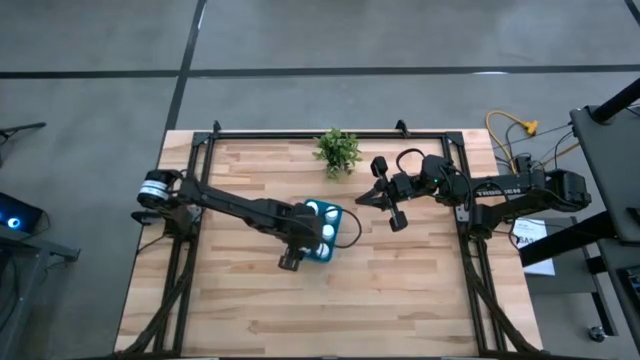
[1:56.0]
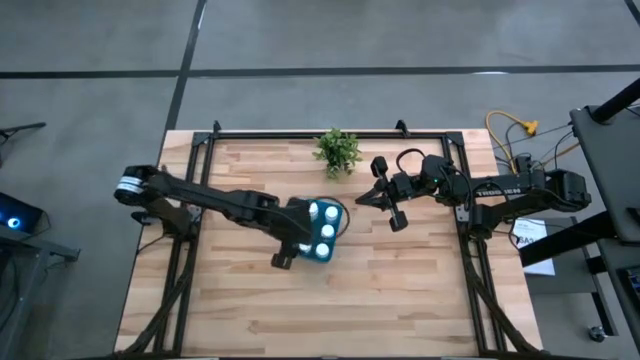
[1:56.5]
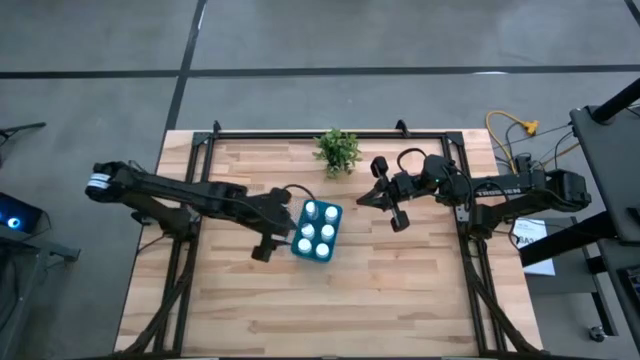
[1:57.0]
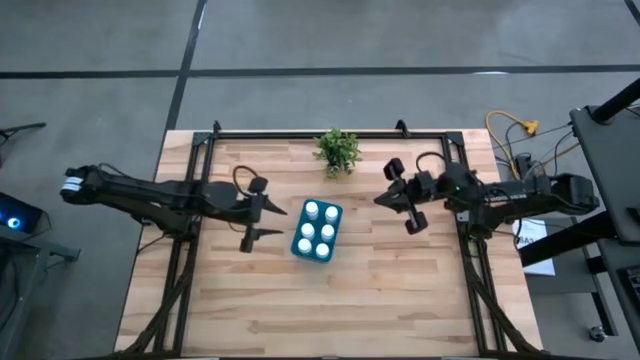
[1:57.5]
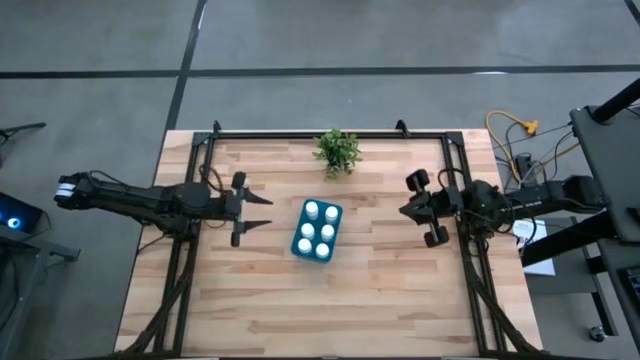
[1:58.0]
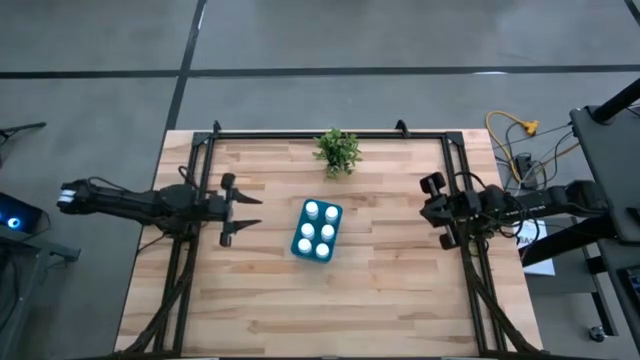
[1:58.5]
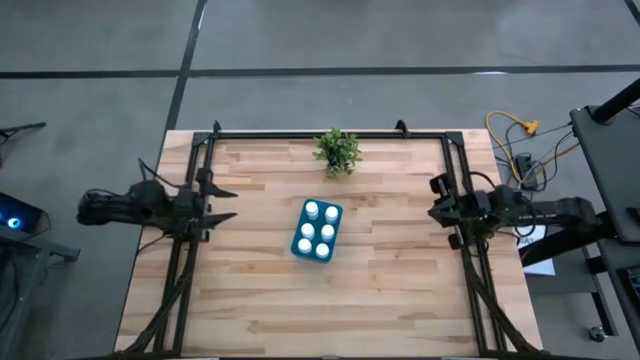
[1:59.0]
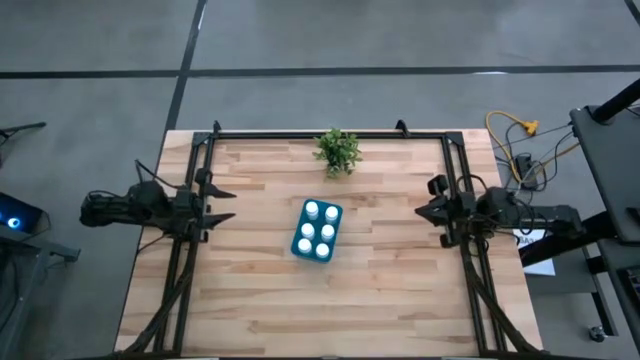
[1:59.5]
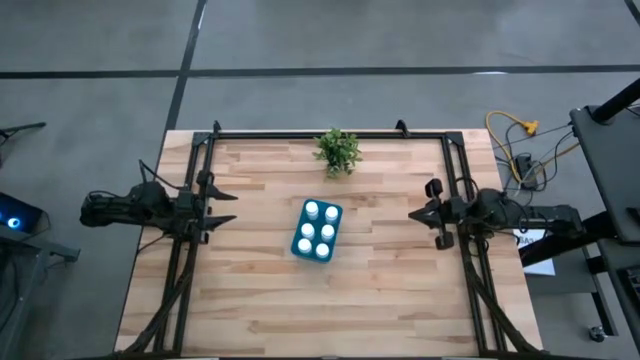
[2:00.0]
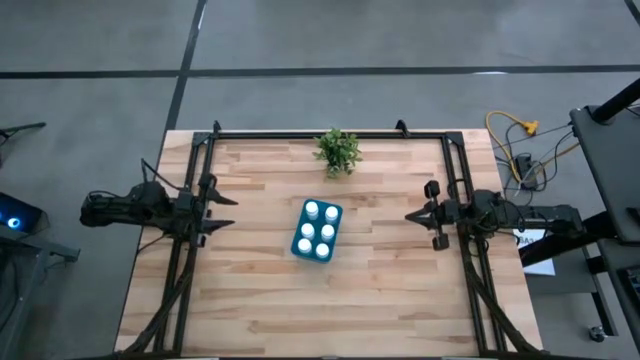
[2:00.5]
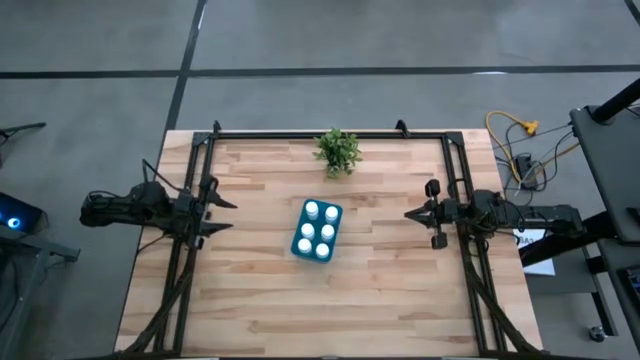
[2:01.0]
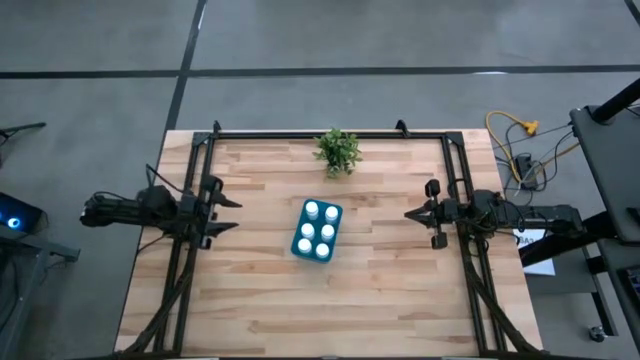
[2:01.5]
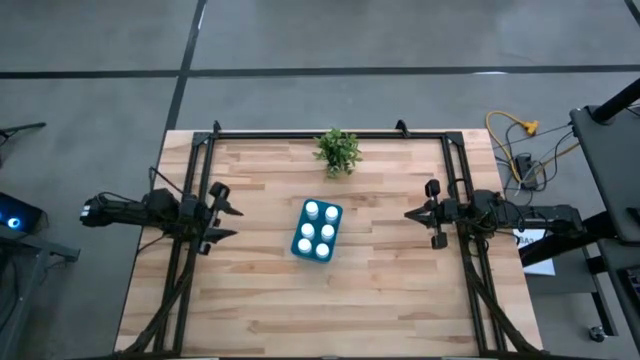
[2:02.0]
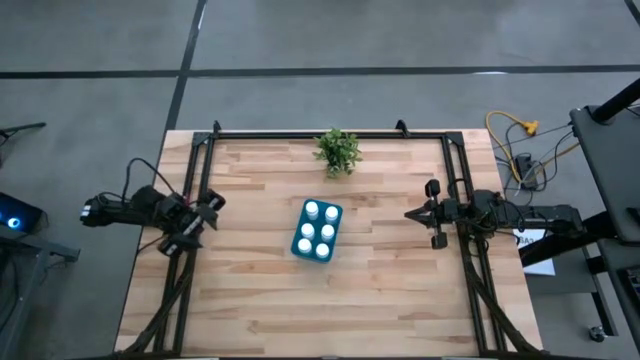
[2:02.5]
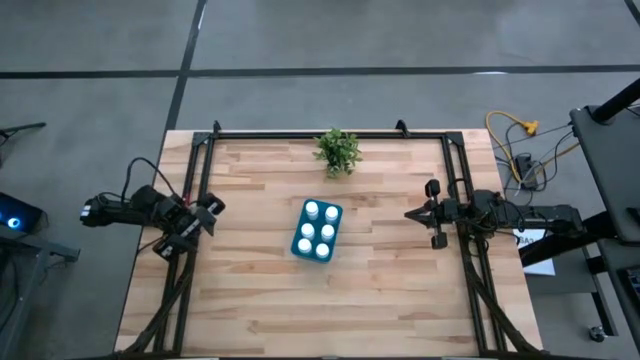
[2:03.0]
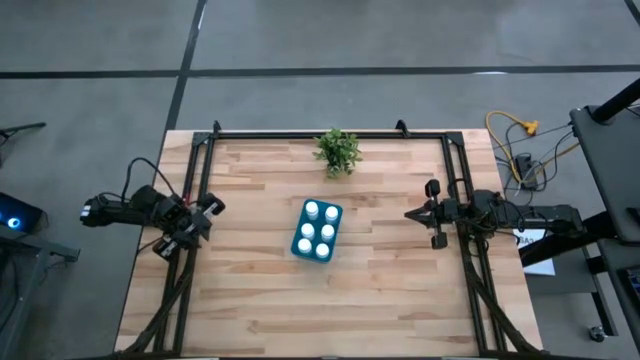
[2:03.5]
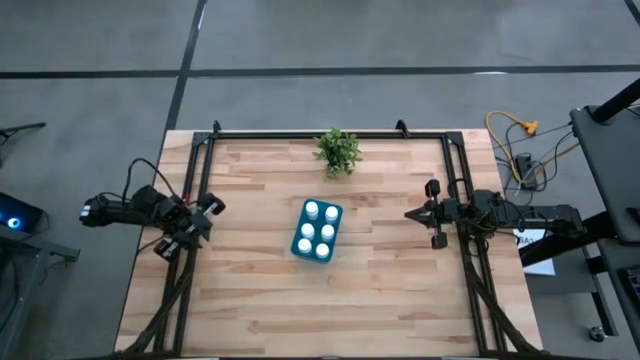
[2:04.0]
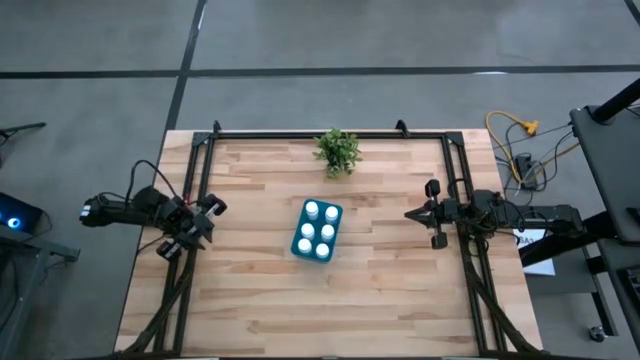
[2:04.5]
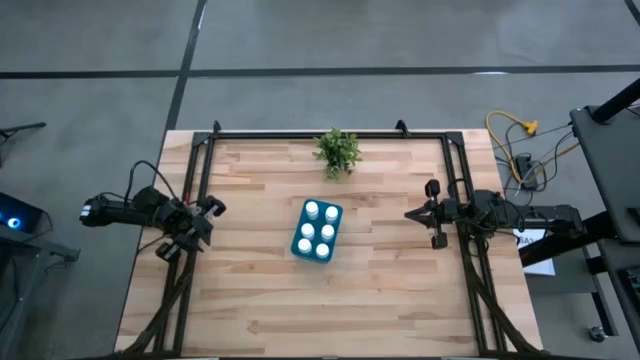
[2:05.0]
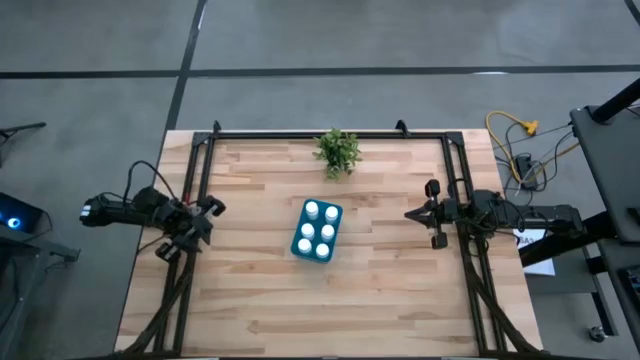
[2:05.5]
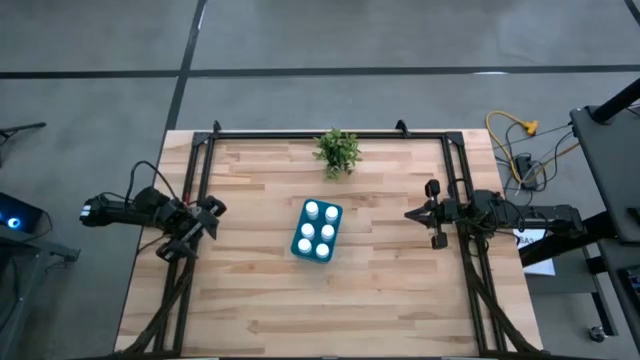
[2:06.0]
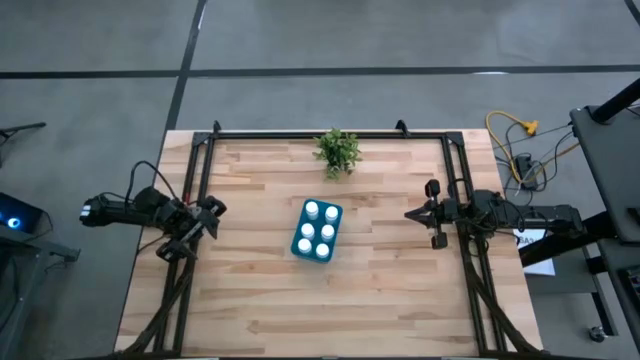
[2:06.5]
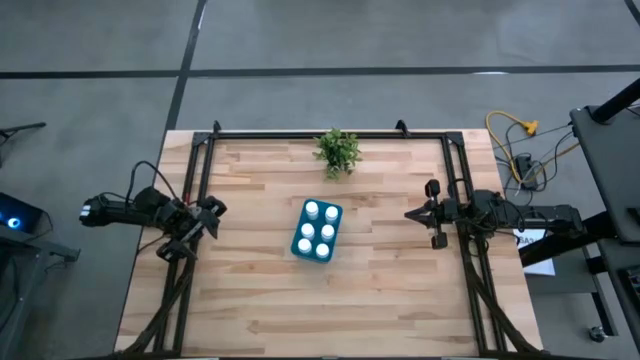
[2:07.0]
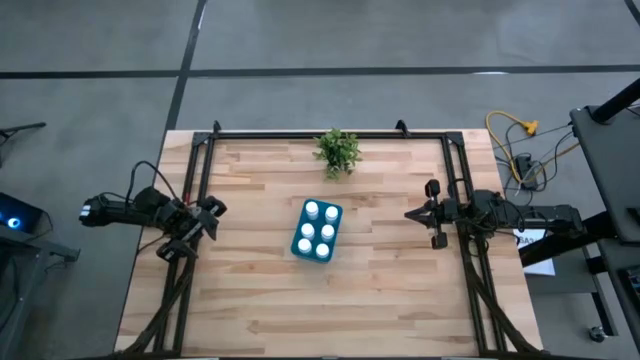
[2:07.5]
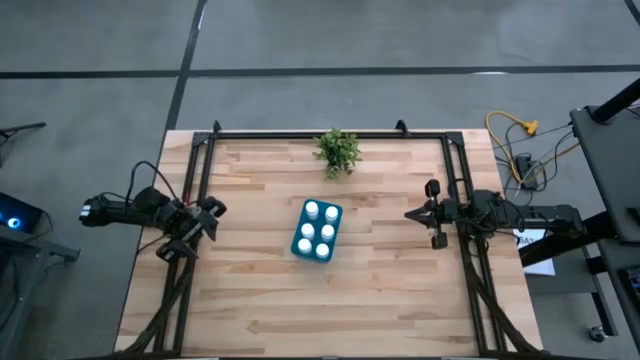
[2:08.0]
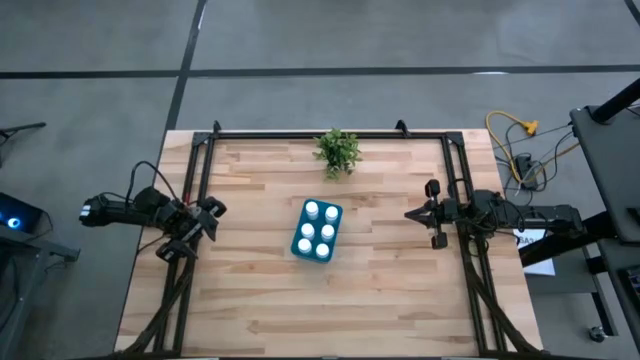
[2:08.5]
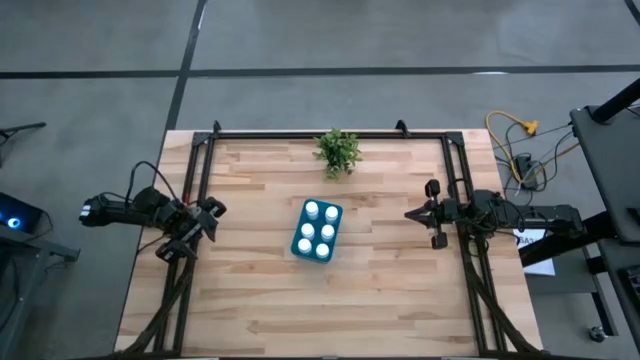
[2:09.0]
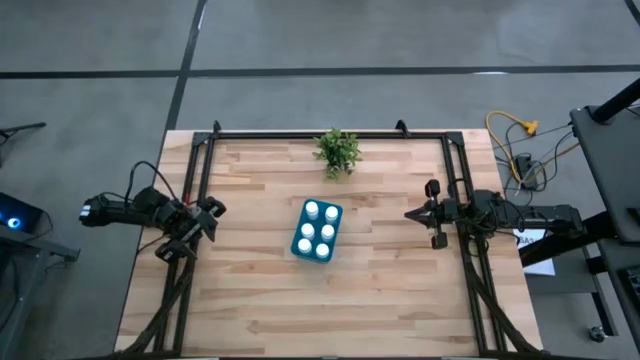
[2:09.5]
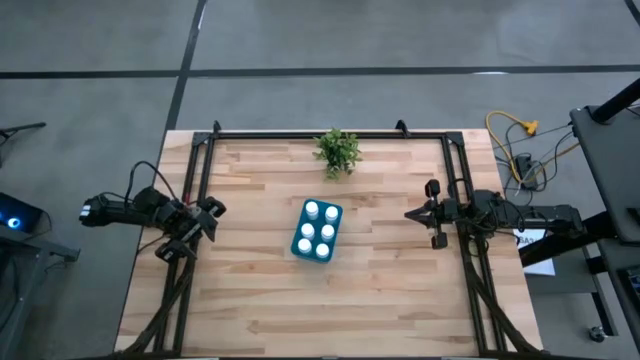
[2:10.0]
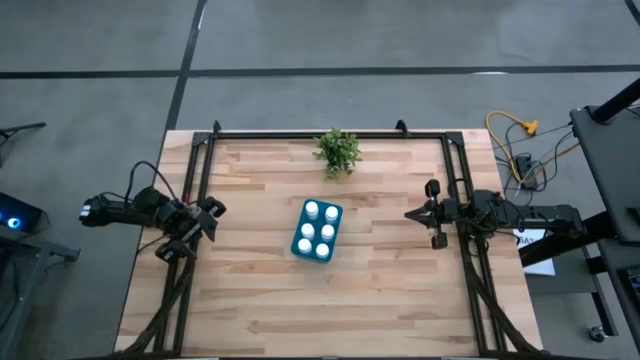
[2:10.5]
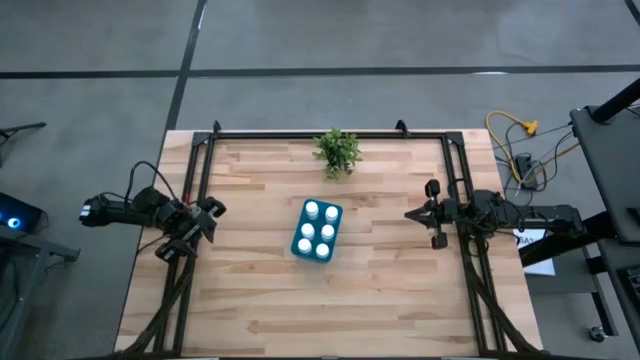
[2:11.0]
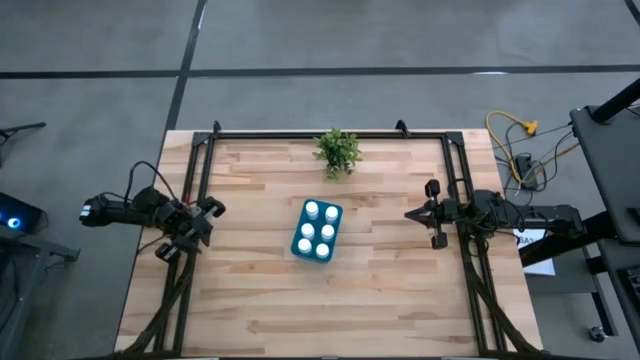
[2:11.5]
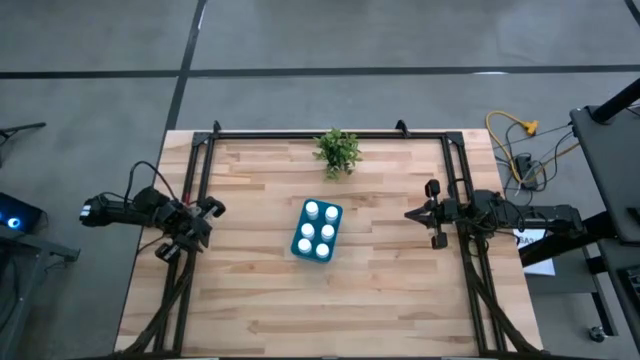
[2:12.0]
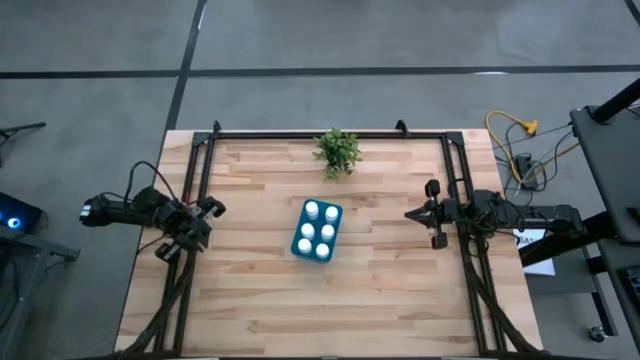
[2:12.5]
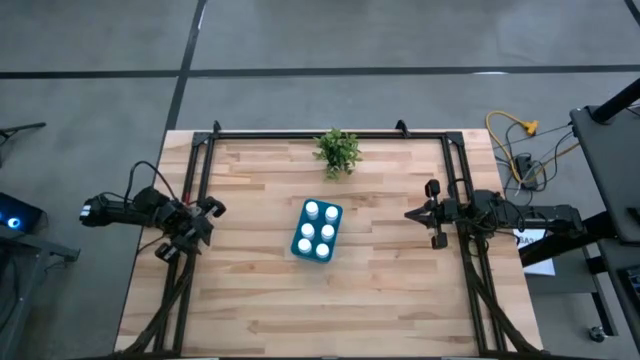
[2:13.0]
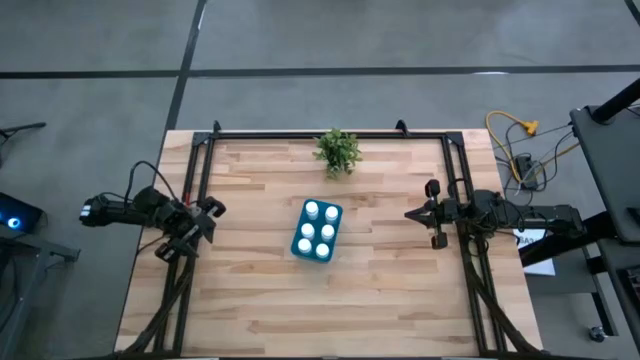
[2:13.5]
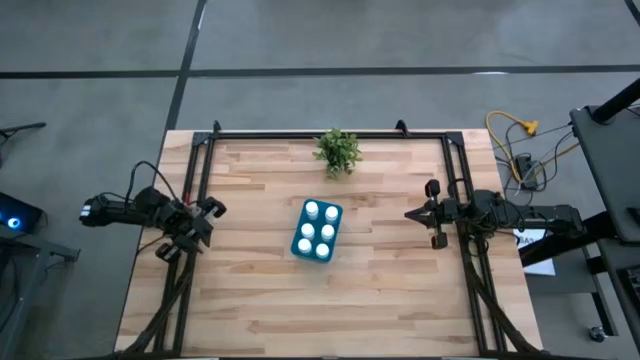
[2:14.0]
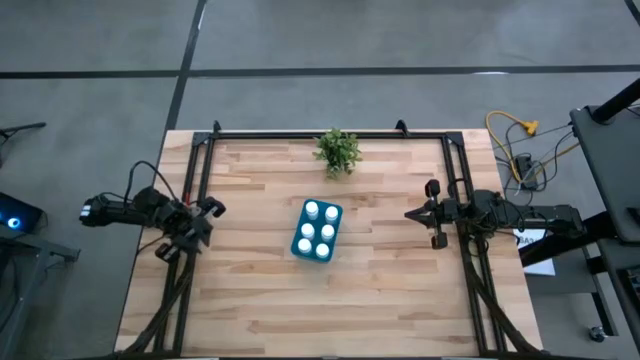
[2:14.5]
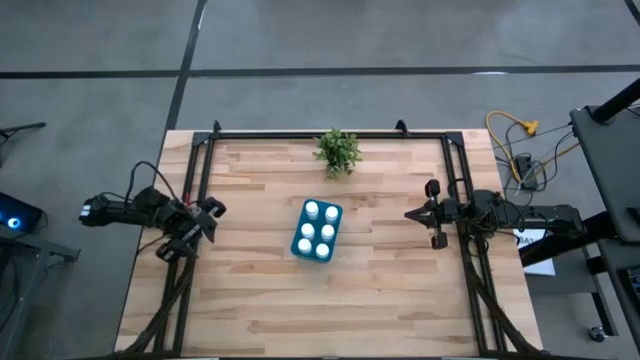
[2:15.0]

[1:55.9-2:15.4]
Task: Pick and place pill bottles into a basket
Return to Home Position
